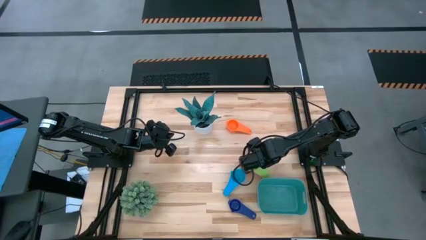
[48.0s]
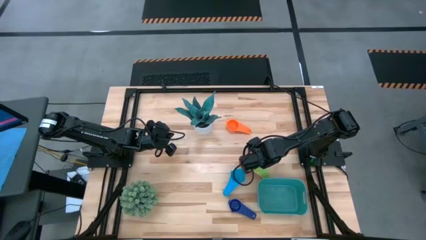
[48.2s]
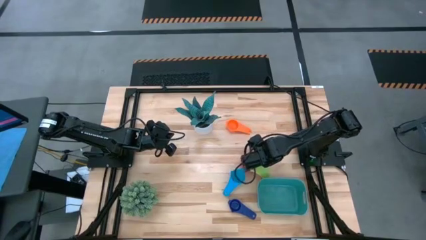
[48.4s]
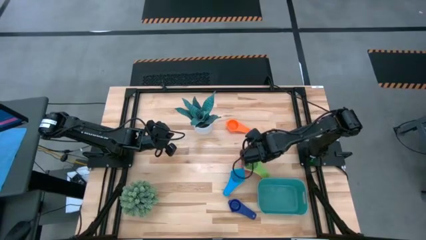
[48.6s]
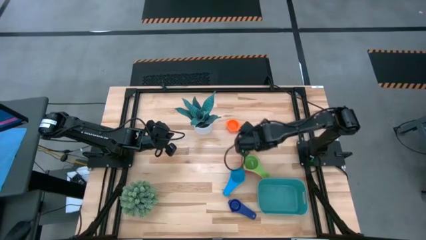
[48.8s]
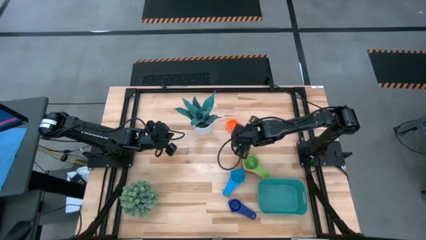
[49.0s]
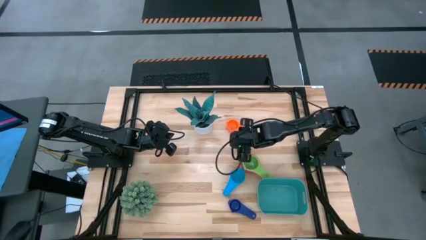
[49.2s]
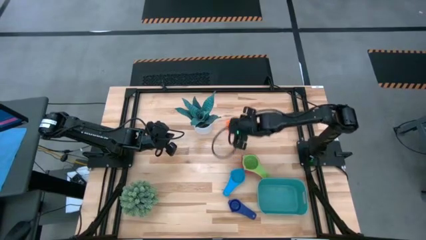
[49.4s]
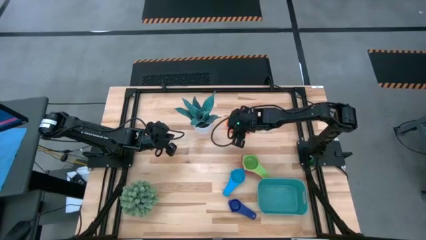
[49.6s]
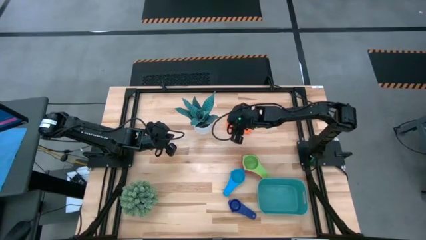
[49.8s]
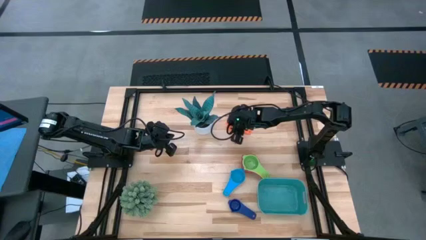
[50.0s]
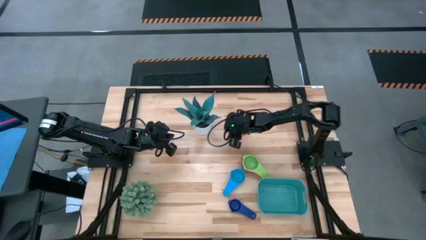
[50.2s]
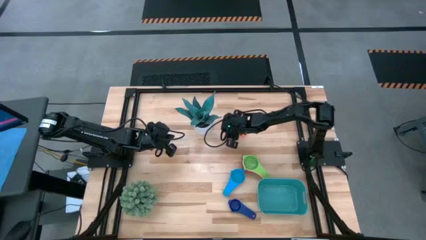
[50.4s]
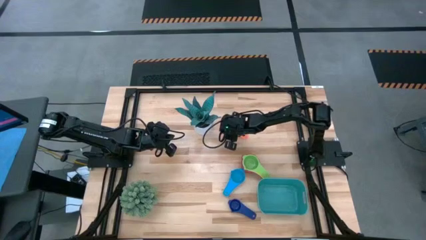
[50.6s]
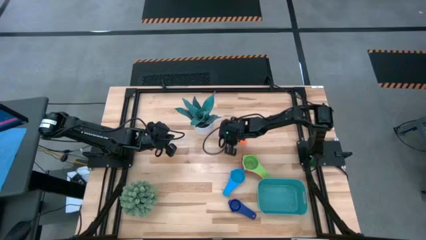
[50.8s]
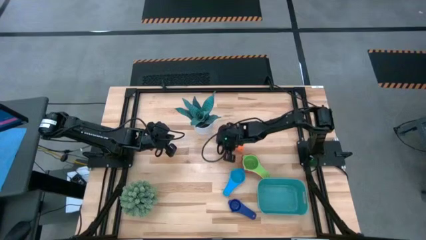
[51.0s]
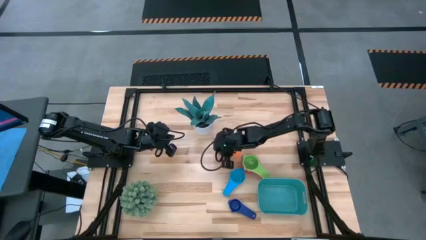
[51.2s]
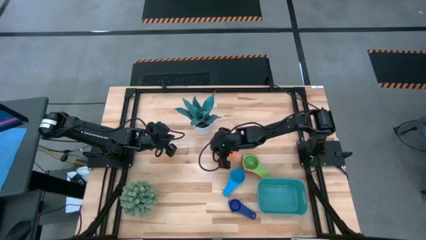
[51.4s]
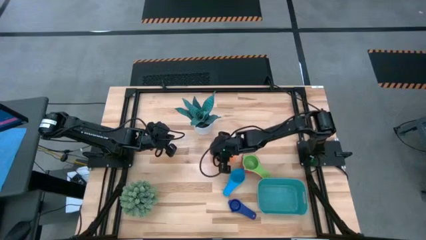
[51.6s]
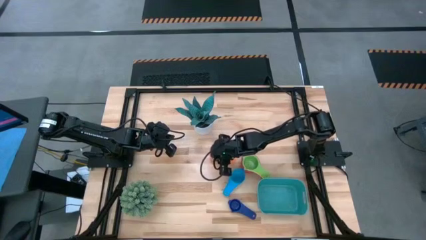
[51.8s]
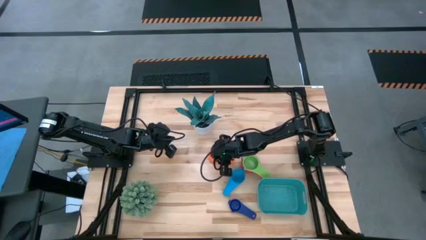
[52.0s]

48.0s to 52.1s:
Task: Nest measuring cups in basket
Move the orange measuring cup to the center of the table

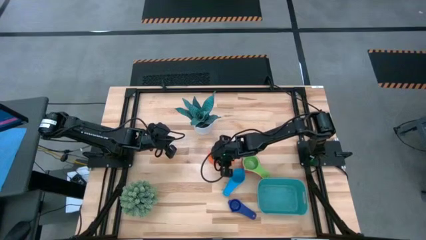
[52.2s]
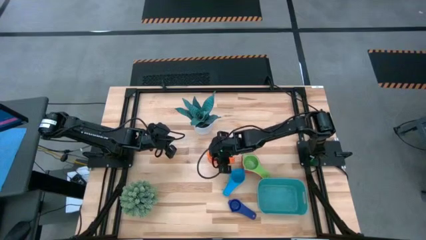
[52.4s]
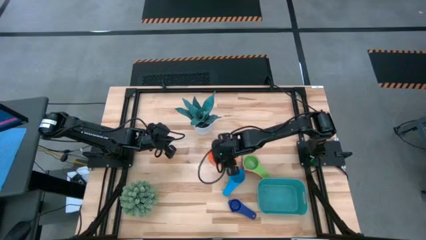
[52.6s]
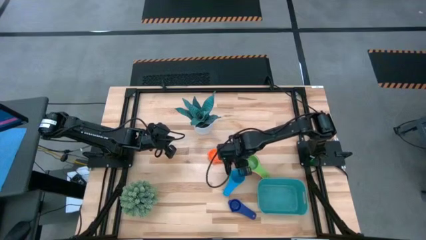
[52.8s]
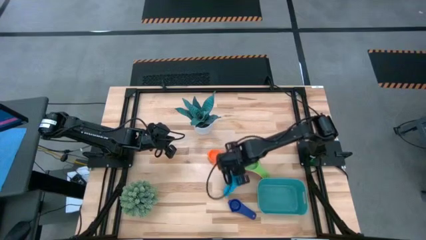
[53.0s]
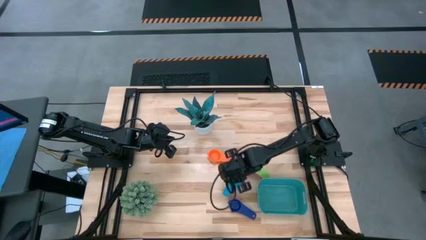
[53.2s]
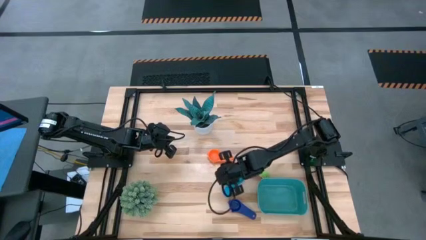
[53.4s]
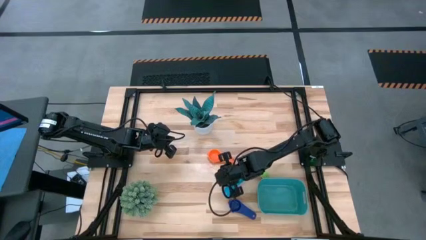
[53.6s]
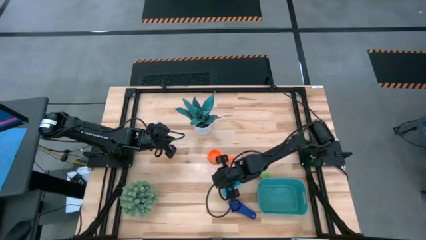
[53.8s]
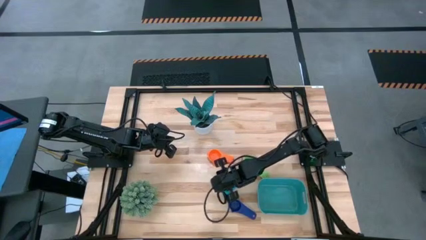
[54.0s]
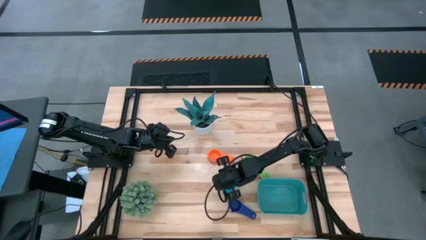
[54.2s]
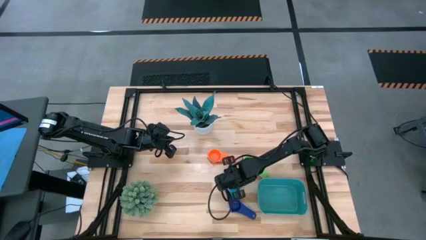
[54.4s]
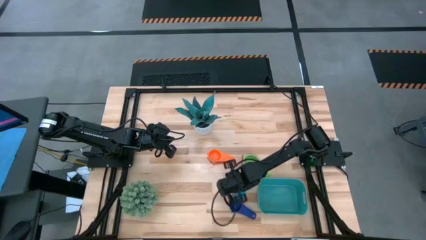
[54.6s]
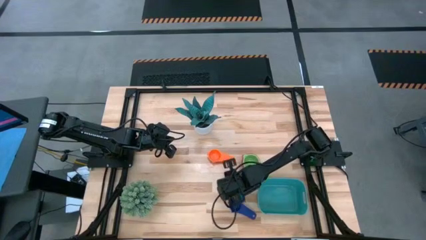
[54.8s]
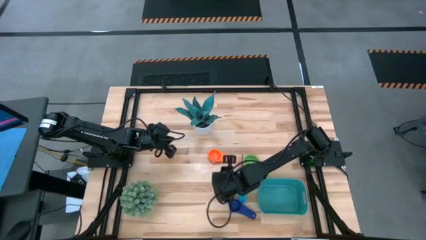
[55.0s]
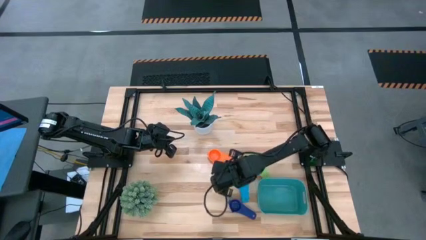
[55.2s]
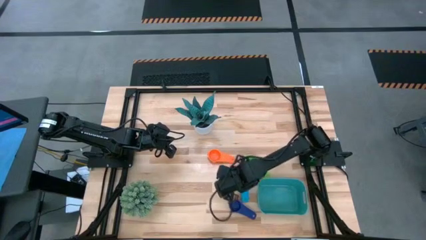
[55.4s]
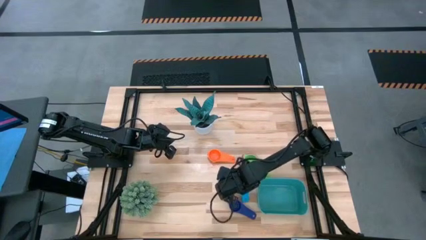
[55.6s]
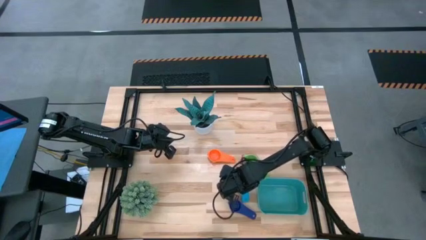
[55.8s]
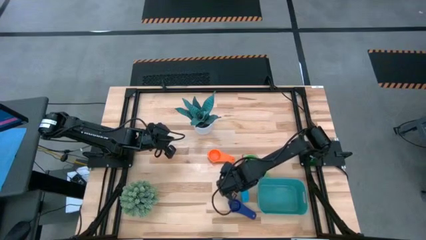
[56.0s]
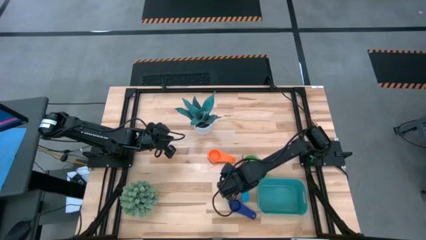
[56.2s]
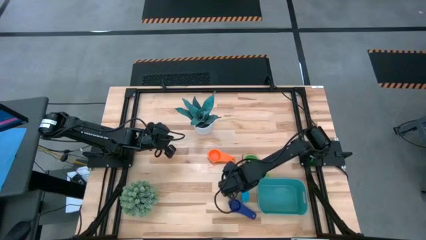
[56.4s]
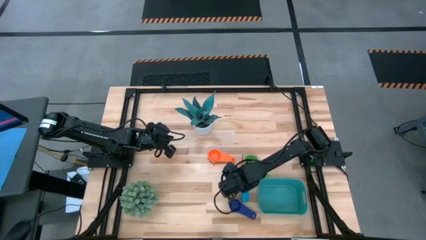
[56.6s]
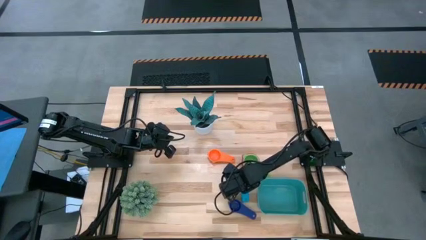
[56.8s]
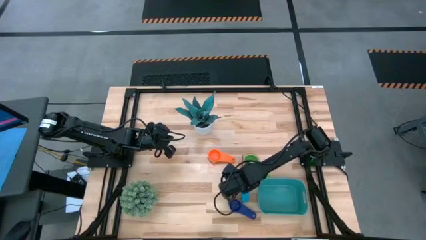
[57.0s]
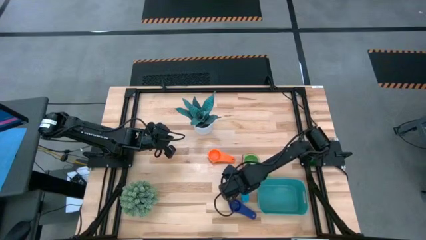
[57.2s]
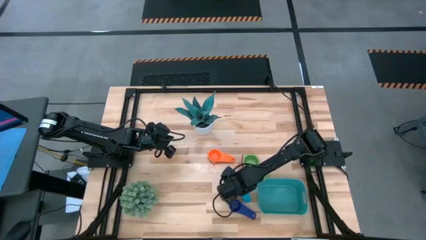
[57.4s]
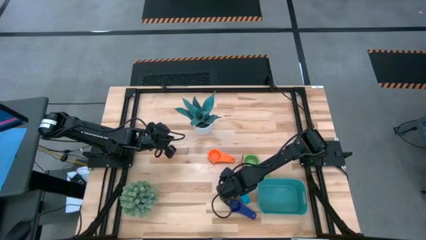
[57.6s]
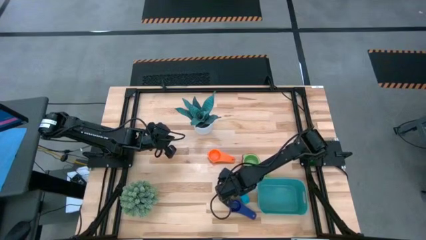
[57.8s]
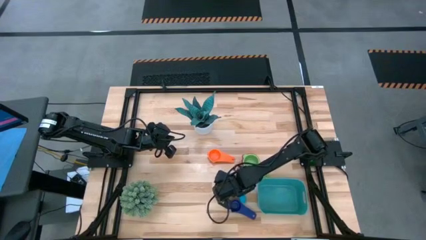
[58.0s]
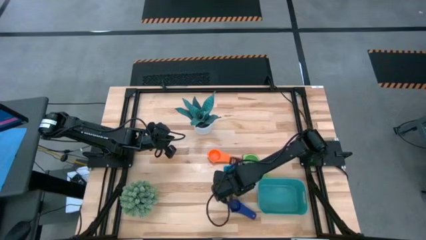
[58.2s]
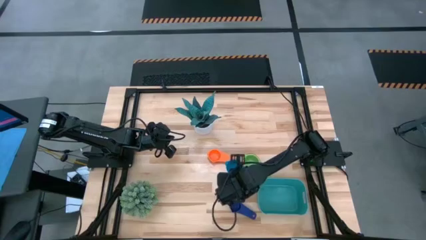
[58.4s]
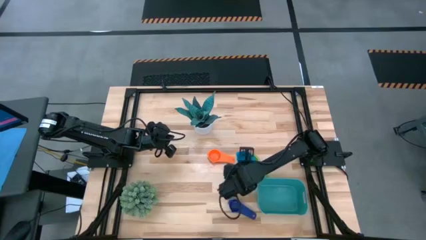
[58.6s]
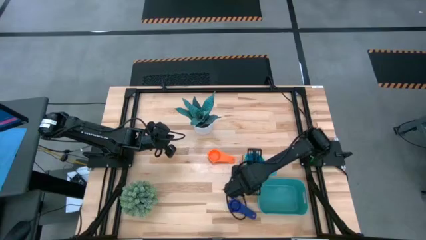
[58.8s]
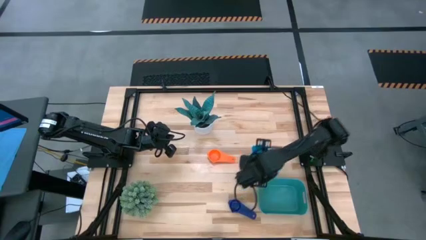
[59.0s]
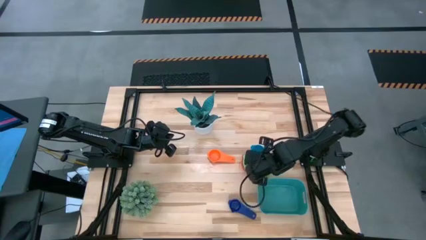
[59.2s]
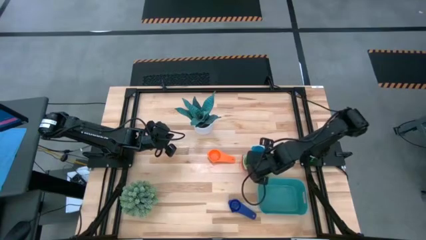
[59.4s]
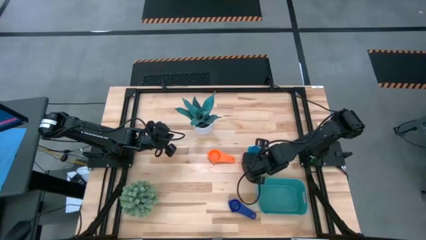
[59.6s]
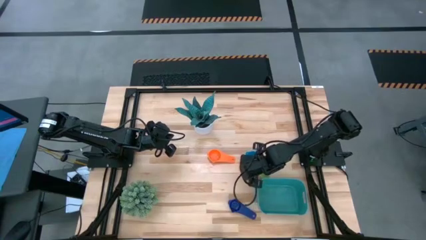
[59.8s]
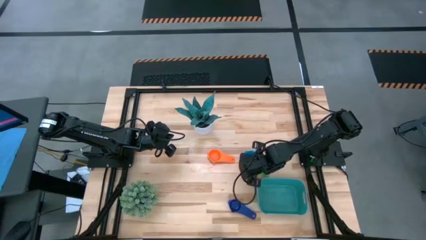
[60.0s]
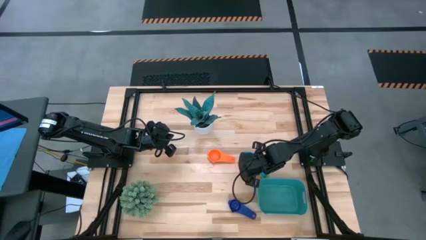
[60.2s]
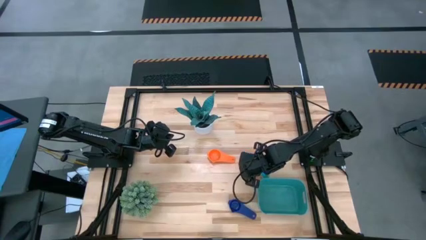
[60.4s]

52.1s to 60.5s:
Stack the light blue measuring cup on top of the green measuring cup

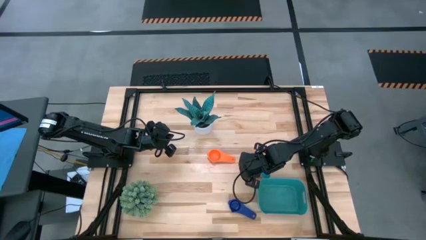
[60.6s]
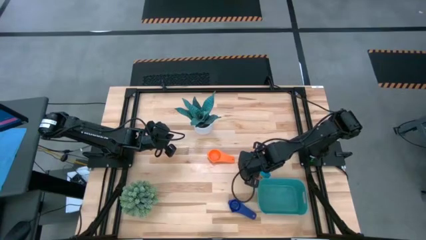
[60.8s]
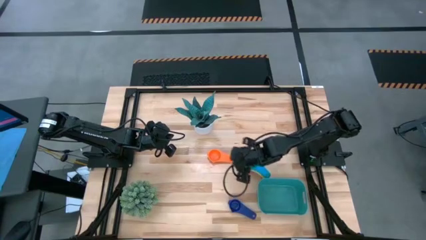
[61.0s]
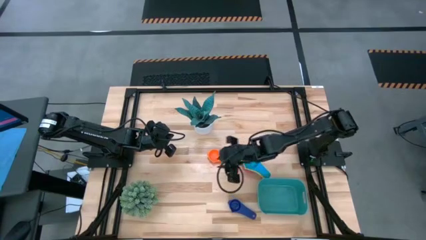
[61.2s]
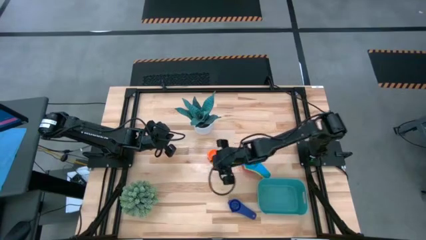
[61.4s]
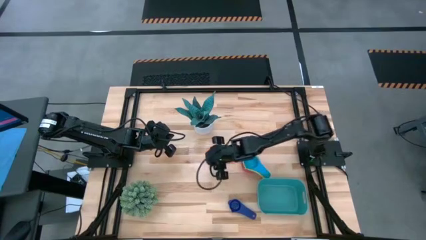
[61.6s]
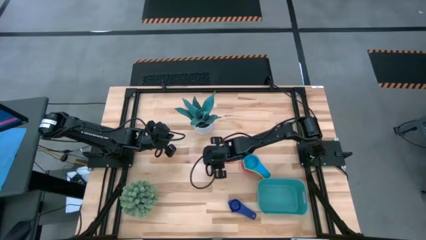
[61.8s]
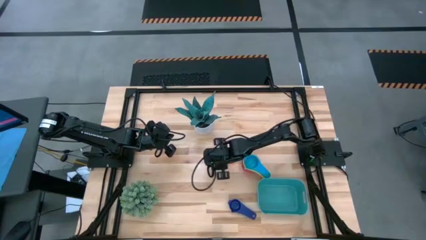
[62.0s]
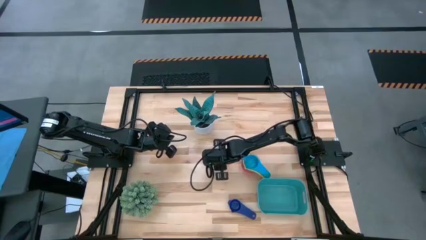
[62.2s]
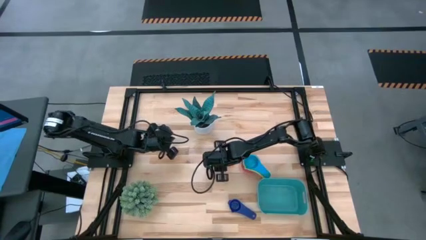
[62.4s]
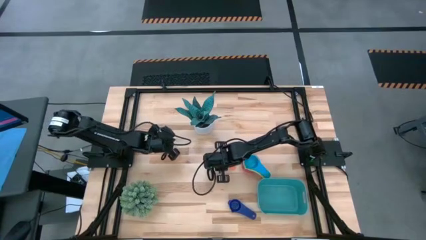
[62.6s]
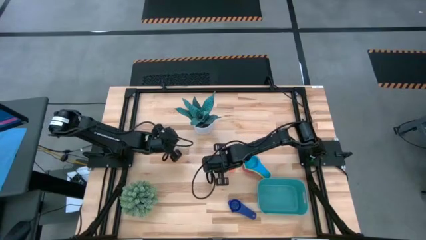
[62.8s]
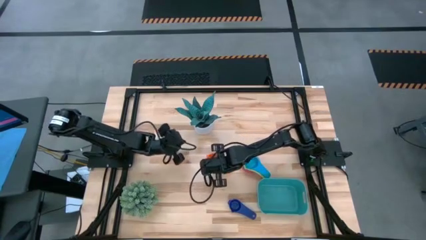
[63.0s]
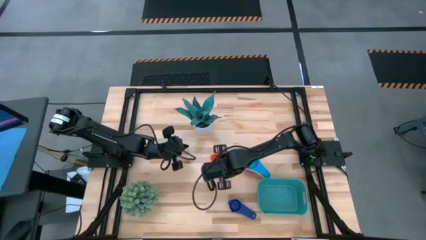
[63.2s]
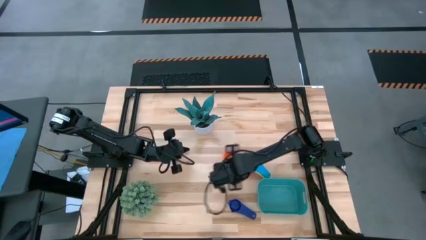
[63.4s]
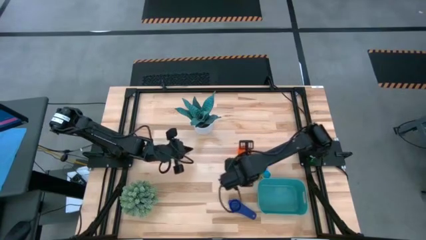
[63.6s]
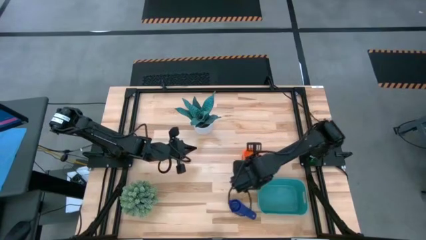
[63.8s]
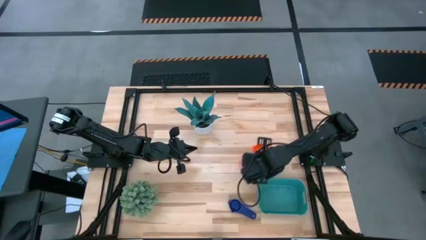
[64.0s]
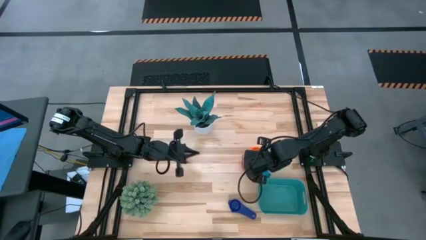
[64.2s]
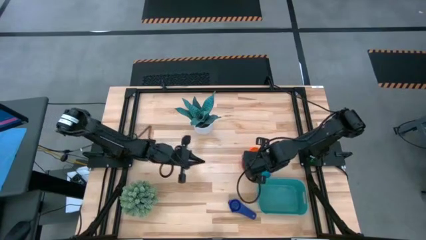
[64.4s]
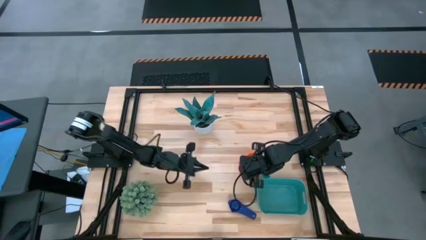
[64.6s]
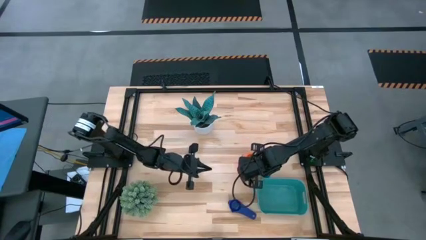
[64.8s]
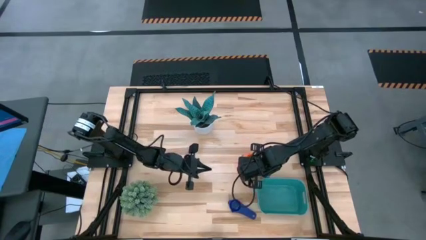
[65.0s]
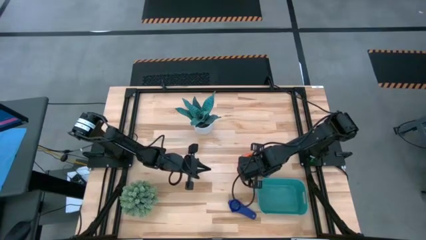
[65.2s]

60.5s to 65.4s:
Stack the orange measuring cup on top of the light blue measuring cup
